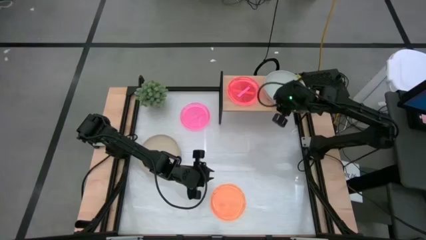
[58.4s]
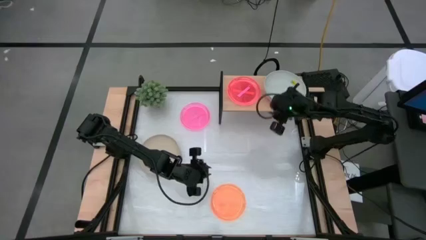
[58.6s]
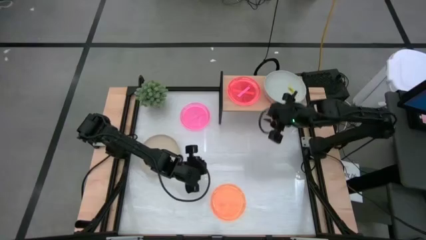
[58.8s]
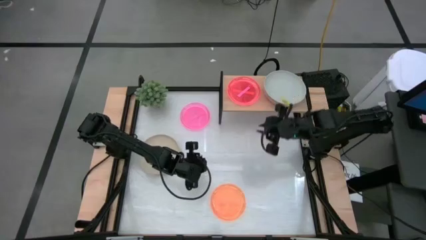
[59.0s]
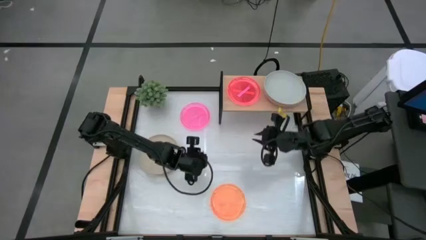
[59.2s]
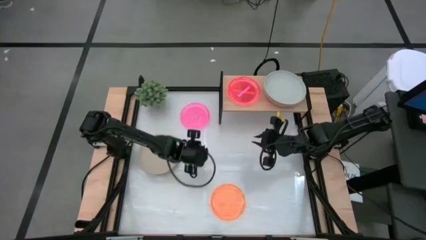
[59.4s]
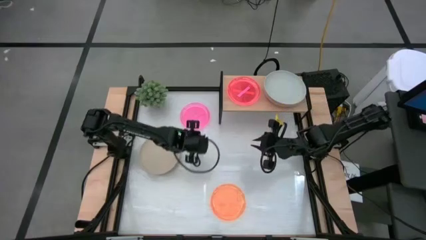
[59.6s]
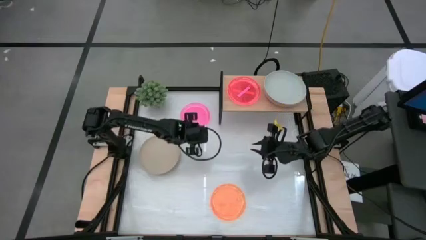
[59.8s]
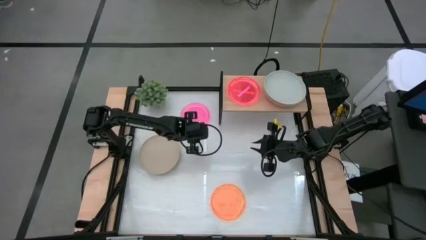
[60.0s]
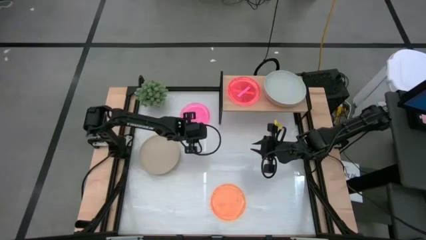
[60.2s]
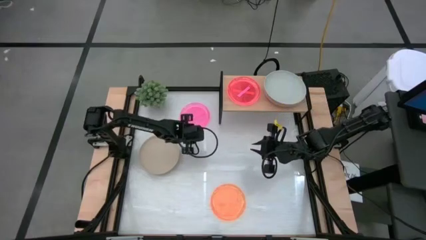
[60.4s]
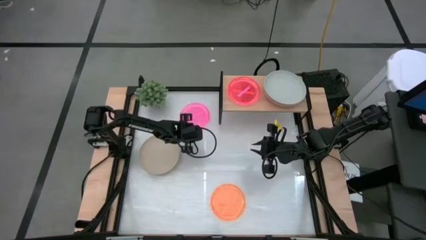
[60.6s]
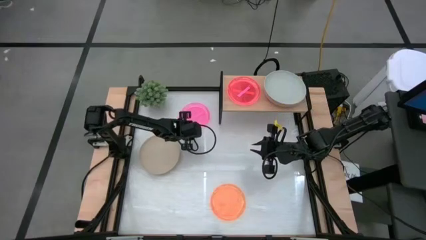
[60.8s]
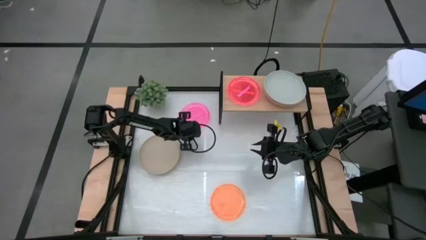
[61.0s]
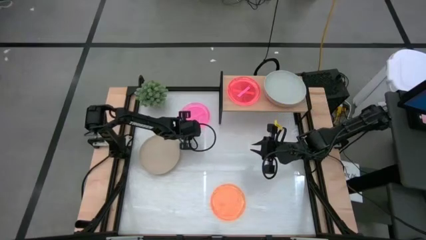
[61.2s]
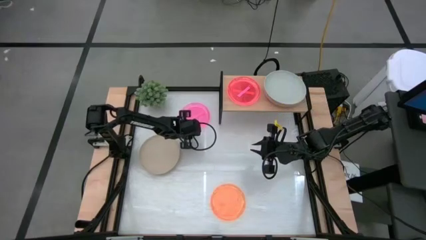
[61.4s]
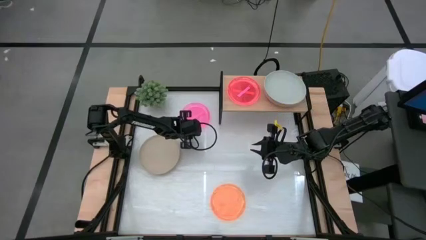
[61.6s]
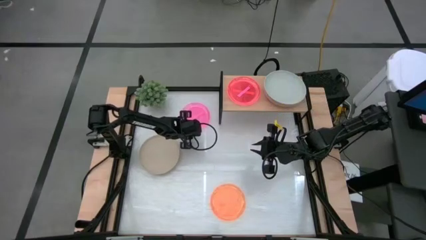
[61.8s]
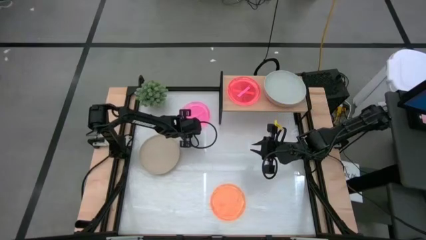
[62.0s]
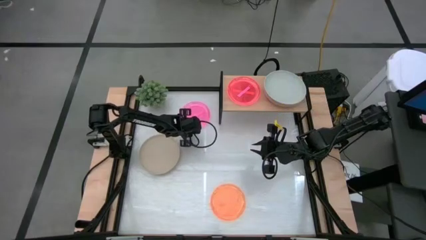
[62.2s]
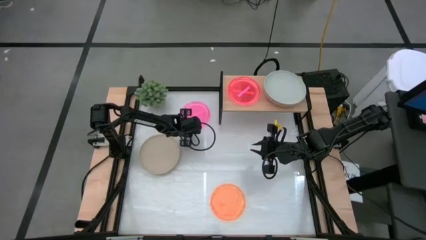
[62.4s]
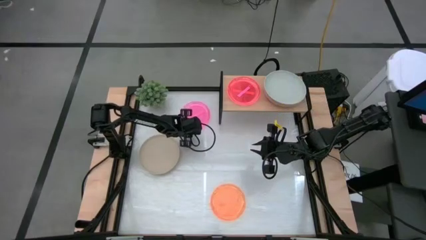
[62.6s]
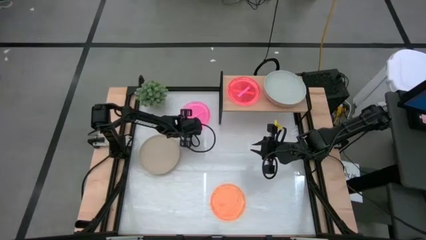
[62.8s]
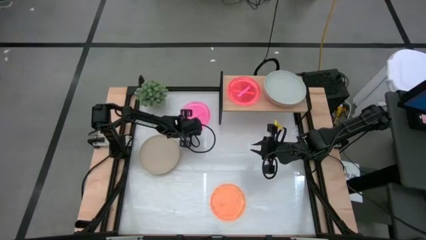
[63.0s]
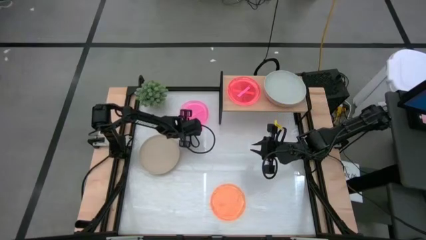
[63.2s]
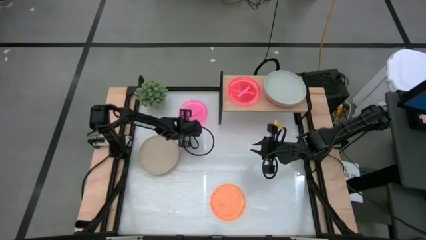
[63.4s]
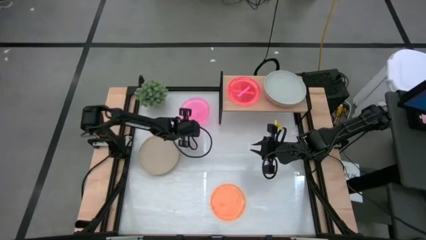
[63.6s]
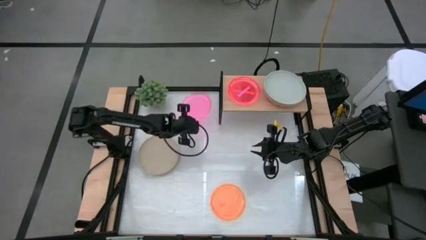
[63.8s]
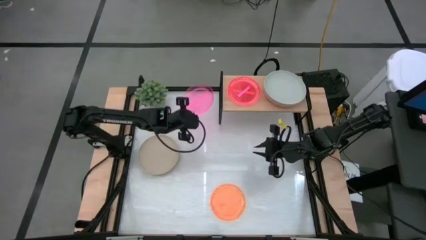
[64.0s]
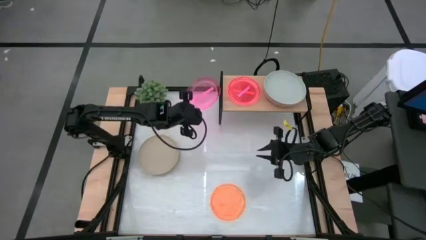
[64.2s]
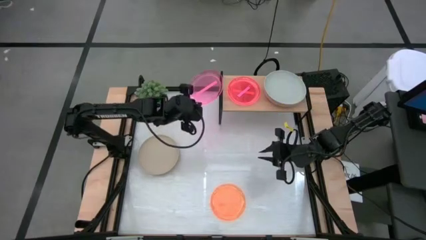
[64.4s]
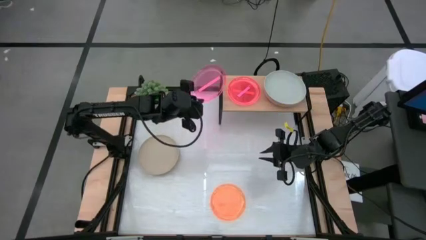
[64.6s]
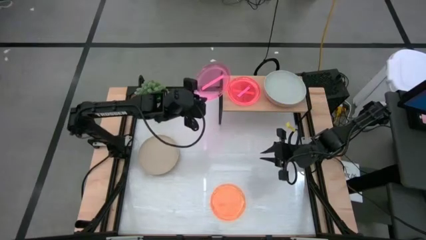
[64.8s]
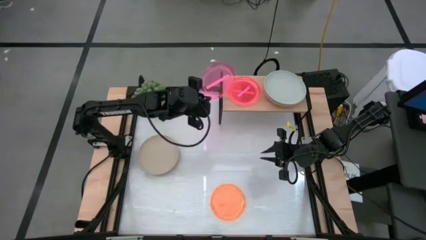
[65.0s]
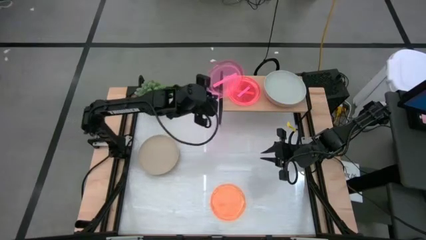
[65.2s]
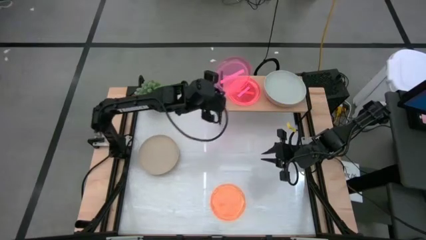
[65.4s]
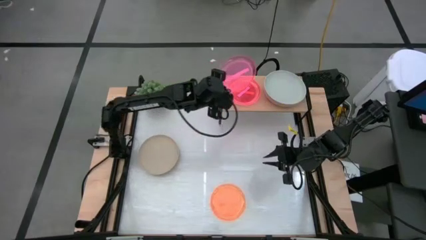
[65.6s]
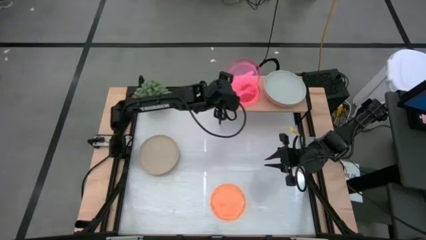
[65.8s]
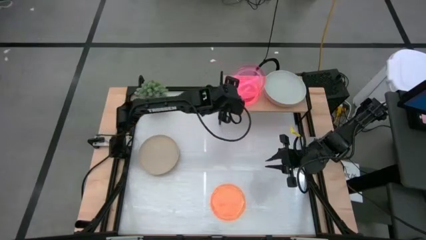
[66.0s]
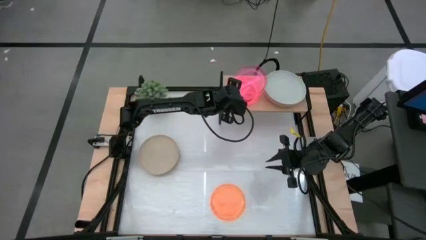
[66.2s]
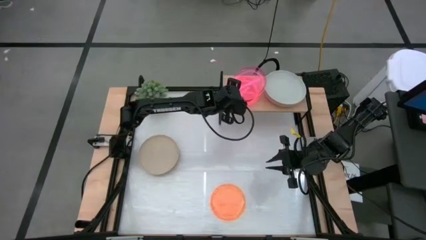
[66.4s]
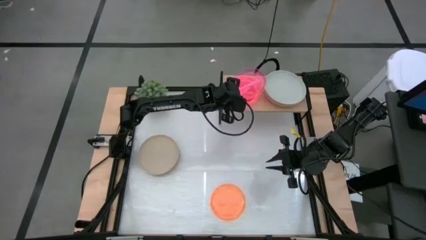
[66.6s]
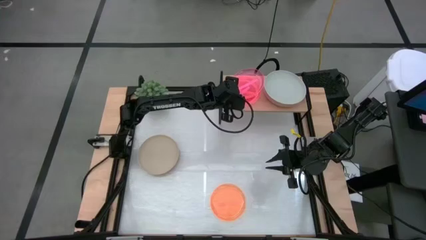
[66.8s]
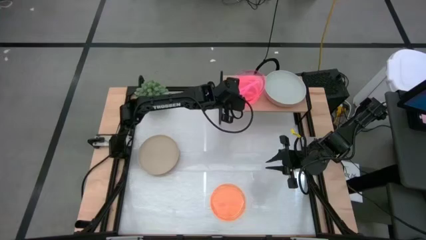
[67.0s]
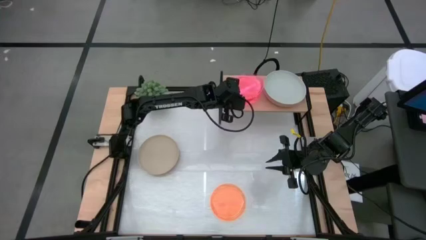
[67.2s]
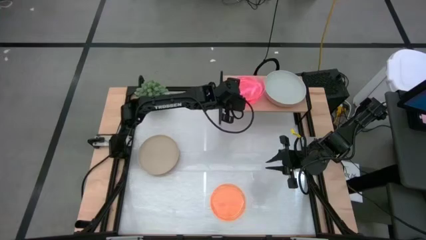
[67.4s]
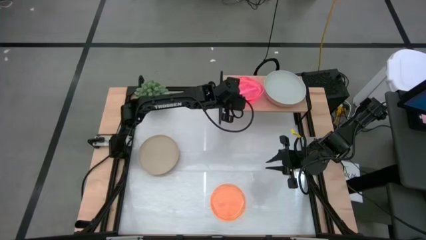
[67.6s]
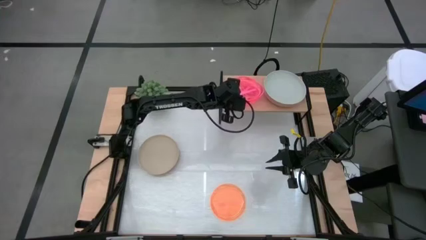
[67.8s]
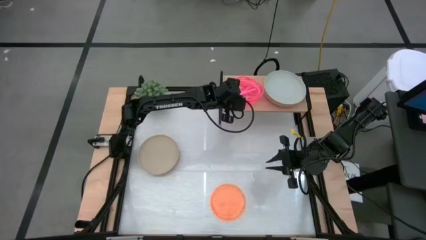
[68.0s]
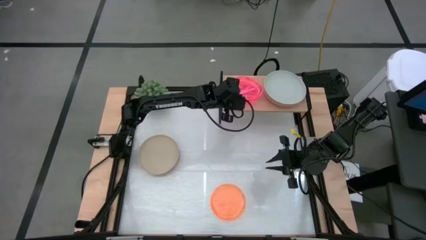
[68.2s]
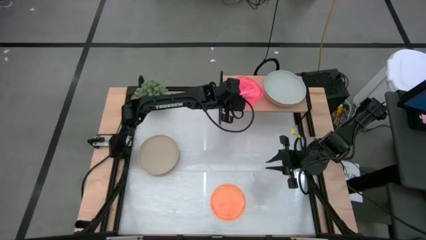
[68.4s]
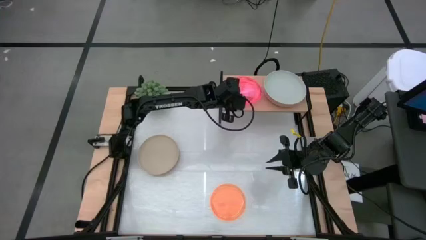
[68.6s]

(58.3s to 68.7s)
Task: Place and stack plates onto a shelf
Stack the pink plate on top of the pink plate on the shelf

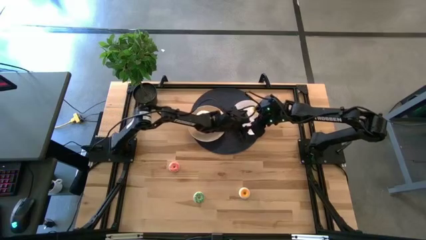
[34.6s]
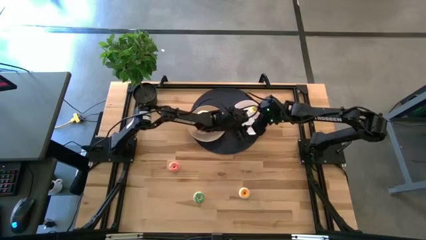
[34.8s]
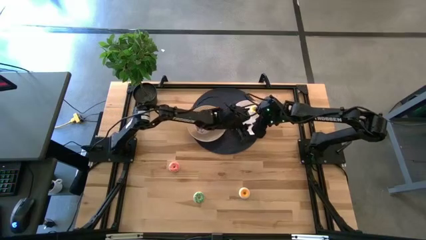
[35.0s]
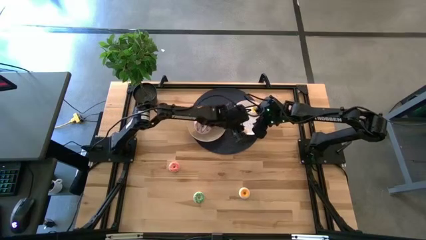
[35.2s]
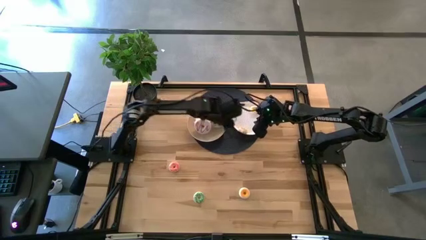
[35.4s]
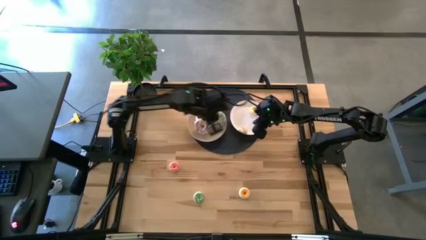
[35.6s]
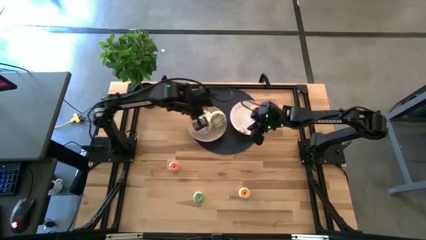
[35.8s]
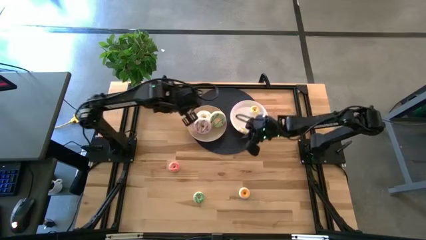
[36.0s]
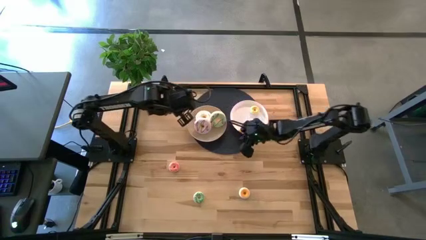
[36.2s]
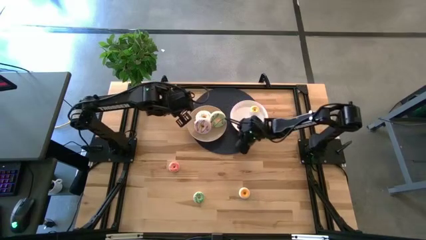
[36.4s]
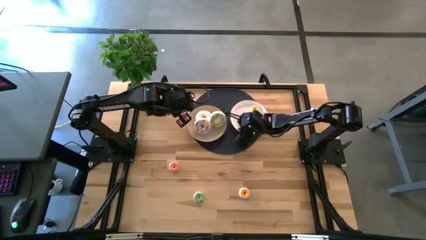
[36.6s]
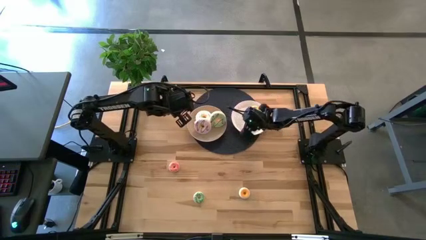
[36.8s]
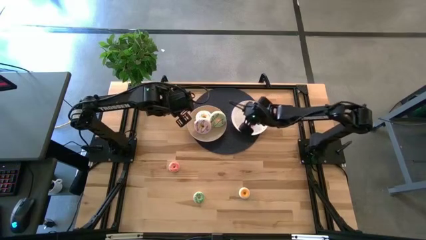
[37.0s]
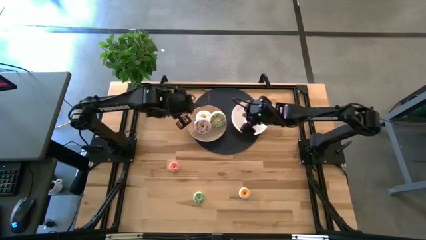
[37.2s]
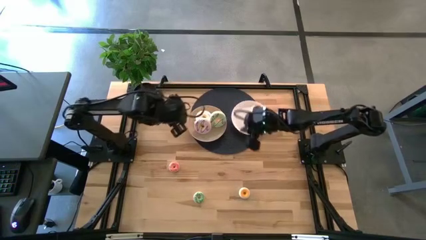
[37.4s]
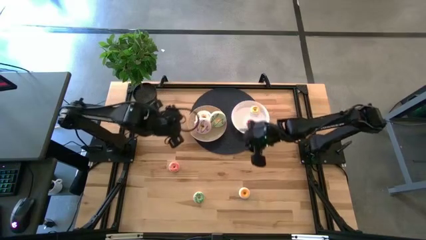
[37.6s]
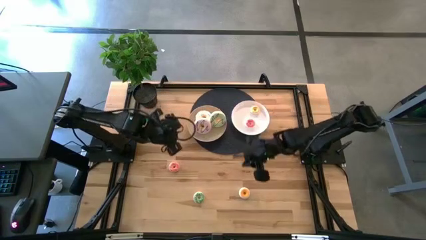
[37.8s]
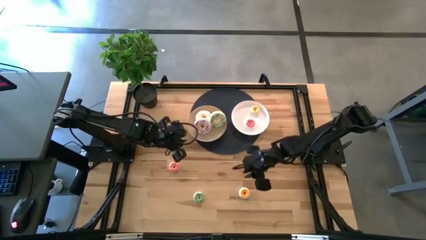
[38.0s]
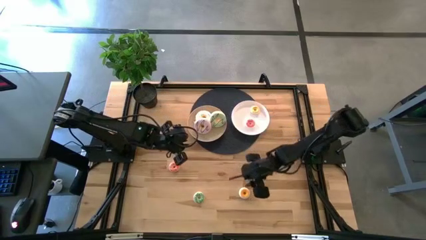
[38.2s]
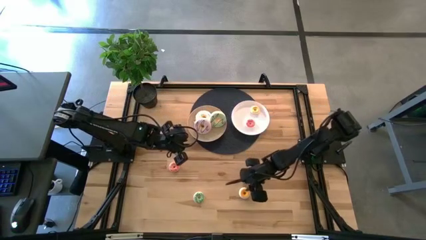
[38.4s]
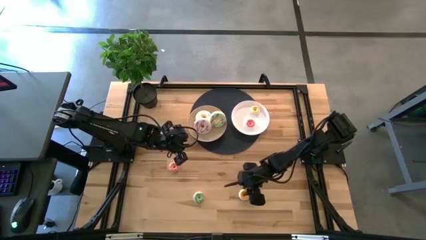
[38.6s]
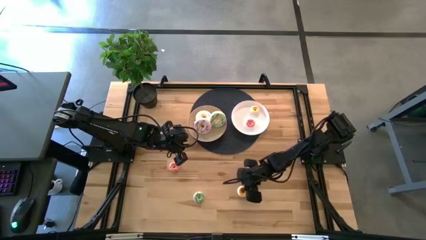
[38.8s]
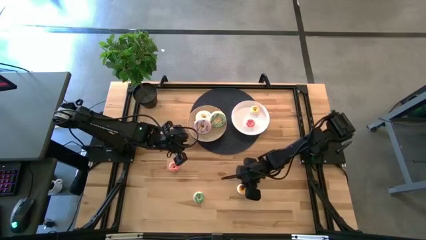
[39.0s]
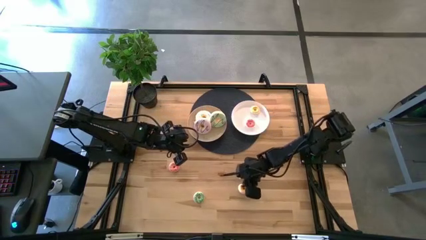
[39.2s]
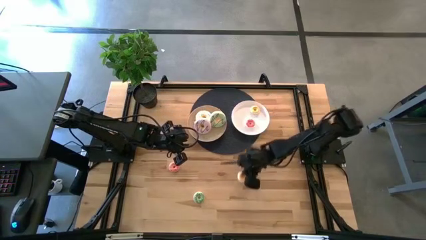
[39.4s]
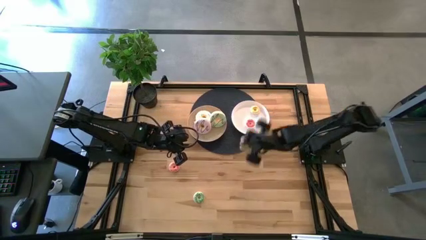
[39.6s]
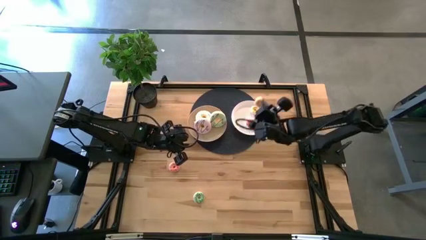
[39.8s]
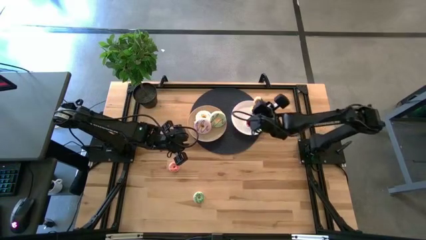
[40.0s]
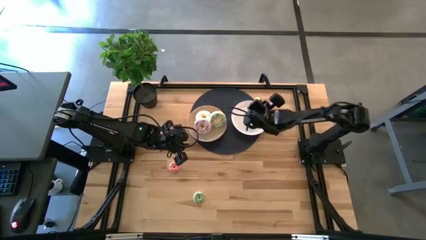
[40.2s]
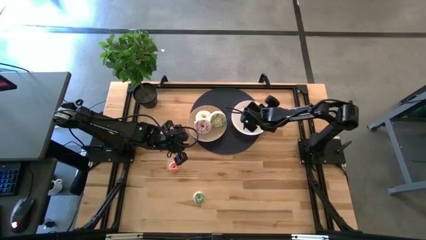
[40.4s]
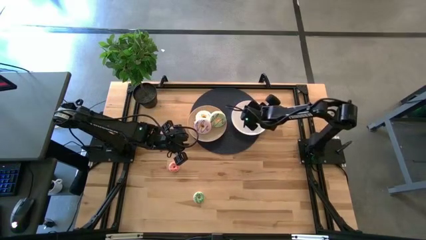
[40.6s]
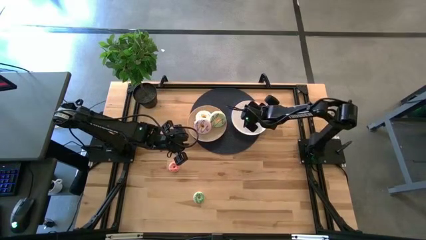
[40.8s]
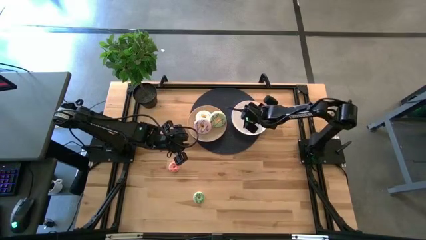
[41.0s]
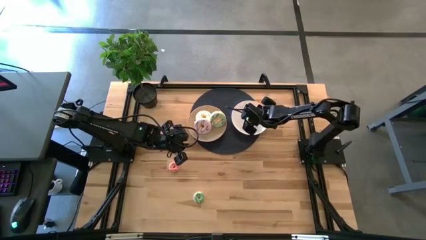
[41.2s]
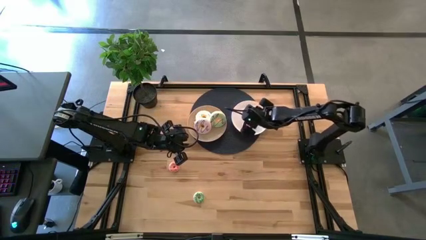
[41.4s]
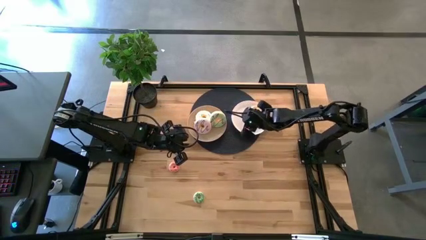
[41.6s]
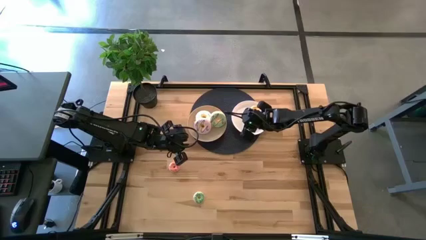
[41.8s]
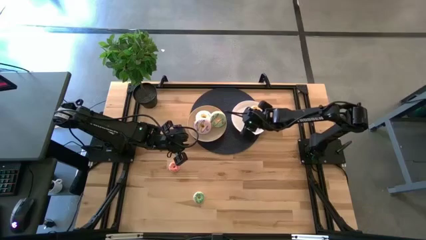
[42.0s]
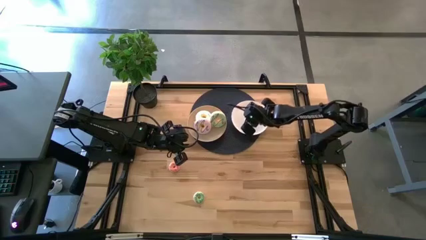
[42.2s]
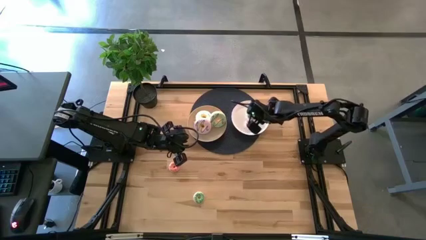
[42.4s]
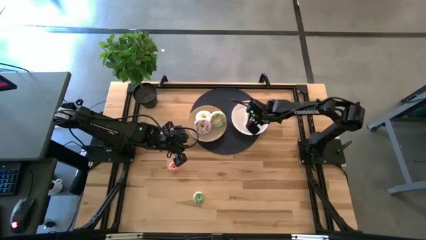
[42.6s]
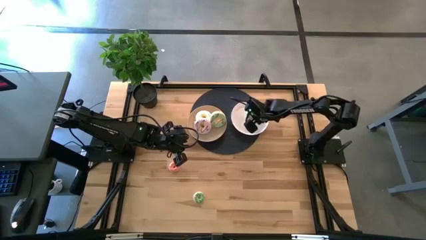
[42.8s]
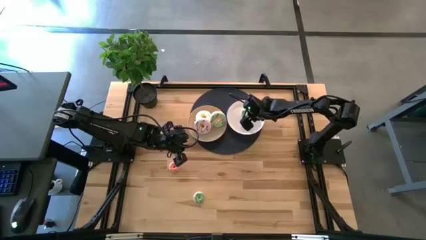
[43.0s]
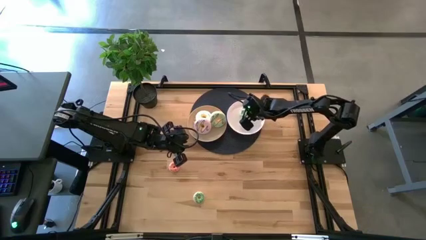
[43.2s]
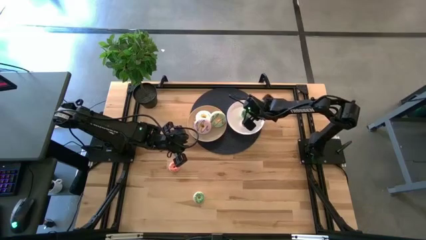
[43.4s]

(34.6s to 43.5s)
Task: Pick & Place donuts
Put the right small green donut on the right white plate
